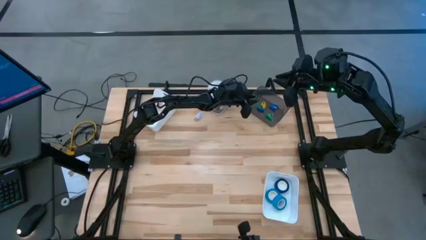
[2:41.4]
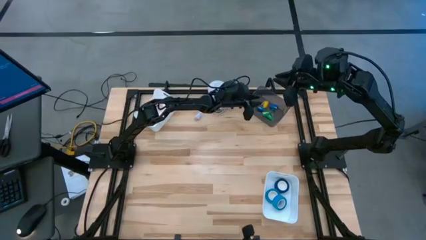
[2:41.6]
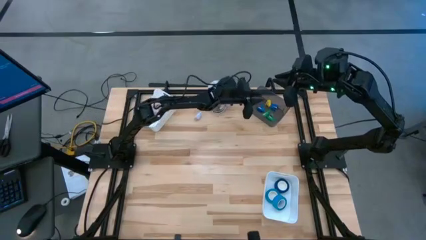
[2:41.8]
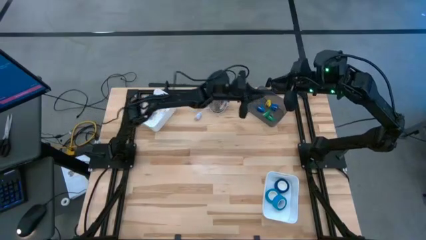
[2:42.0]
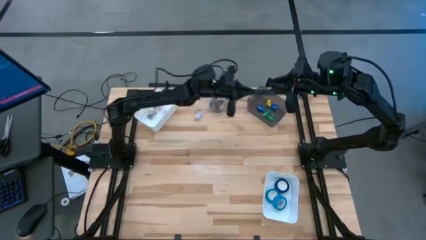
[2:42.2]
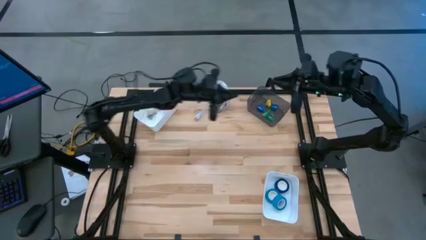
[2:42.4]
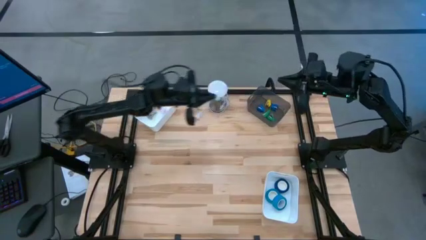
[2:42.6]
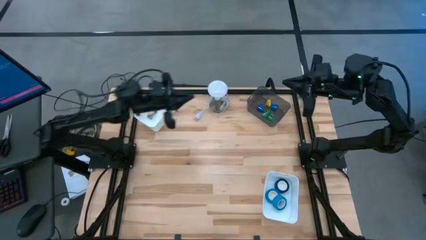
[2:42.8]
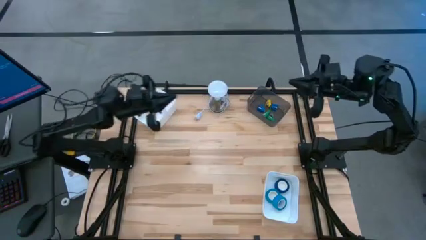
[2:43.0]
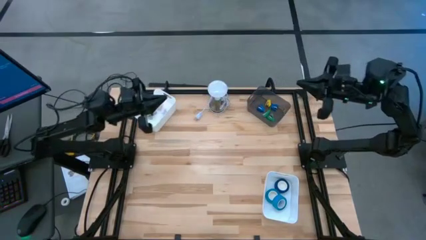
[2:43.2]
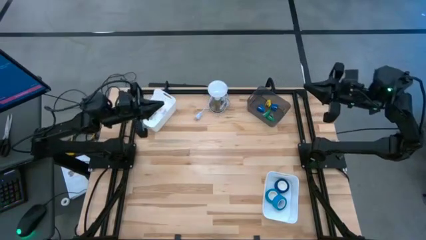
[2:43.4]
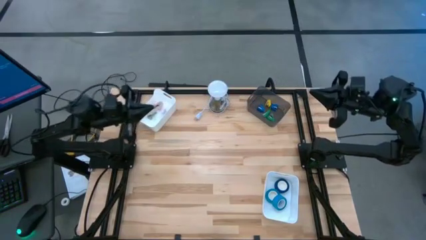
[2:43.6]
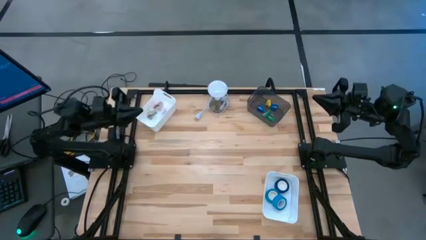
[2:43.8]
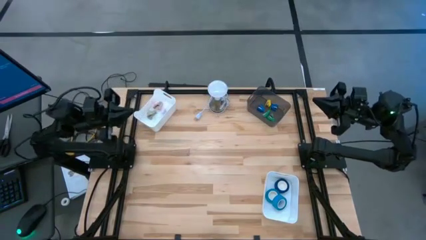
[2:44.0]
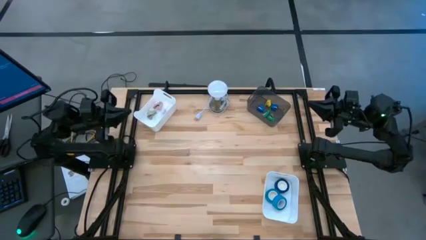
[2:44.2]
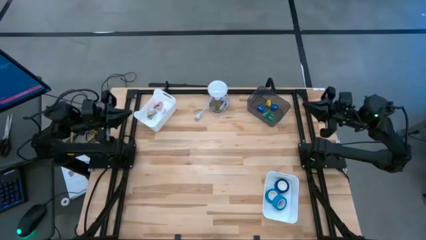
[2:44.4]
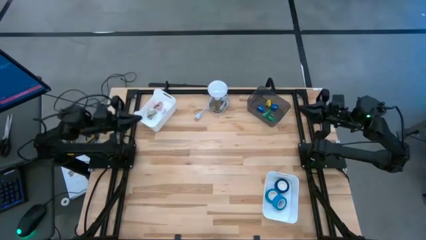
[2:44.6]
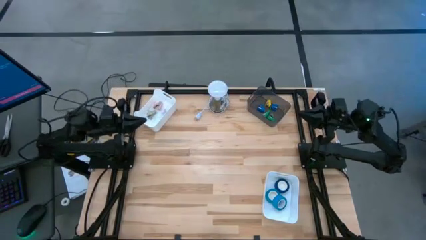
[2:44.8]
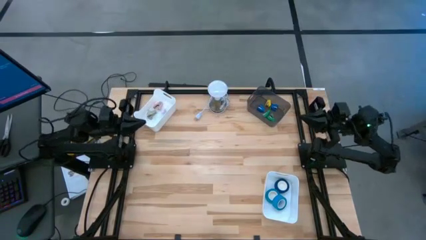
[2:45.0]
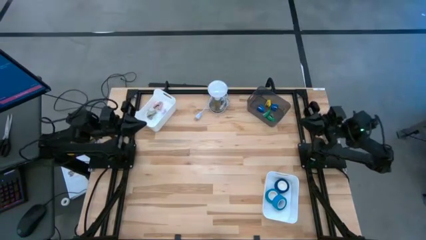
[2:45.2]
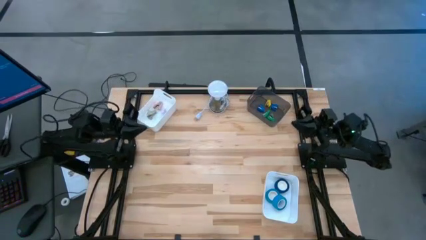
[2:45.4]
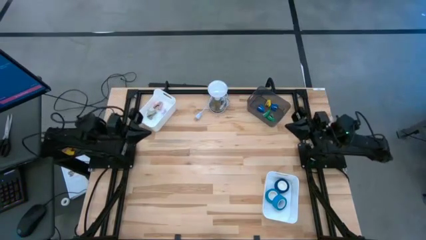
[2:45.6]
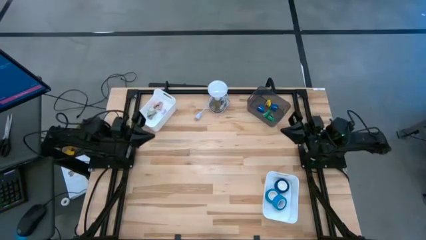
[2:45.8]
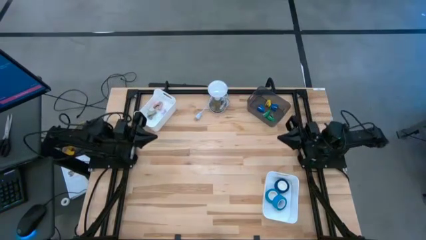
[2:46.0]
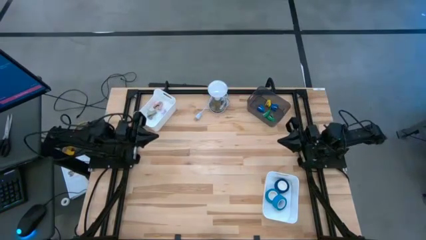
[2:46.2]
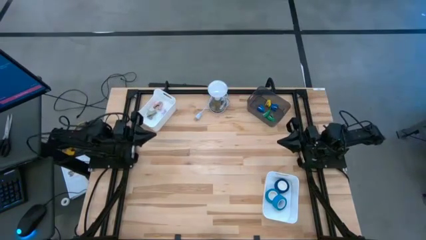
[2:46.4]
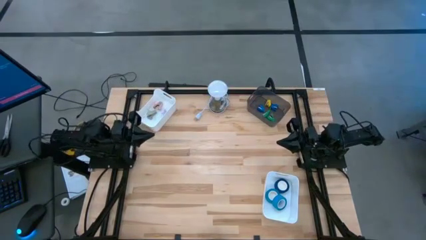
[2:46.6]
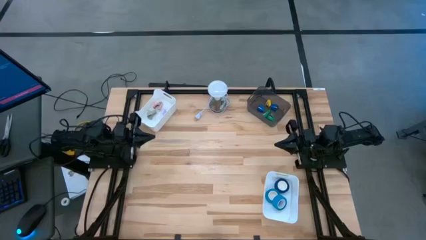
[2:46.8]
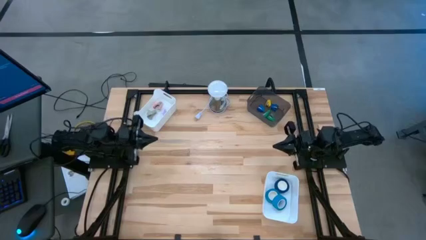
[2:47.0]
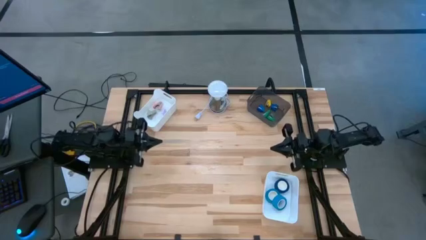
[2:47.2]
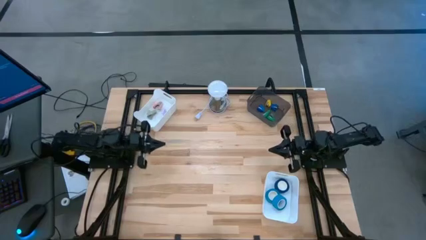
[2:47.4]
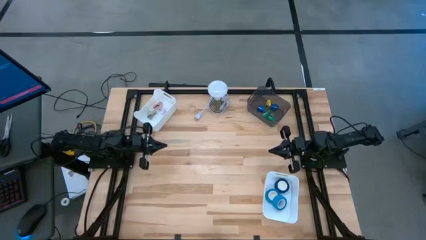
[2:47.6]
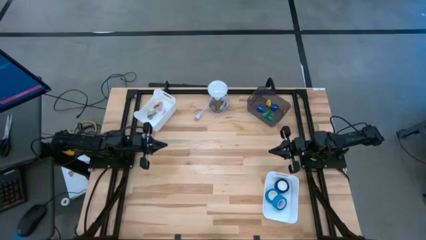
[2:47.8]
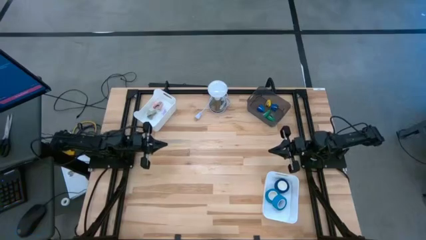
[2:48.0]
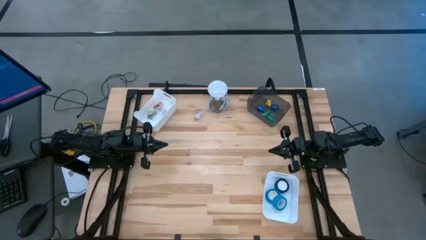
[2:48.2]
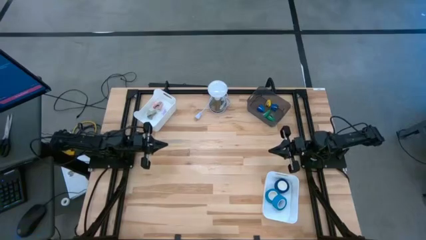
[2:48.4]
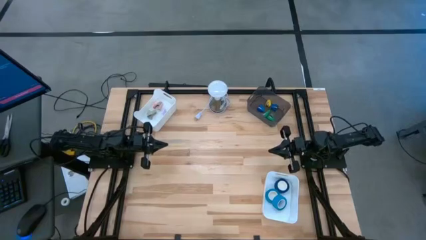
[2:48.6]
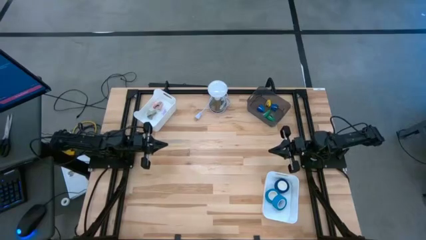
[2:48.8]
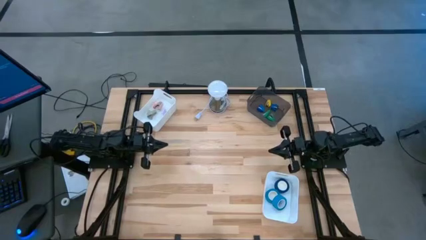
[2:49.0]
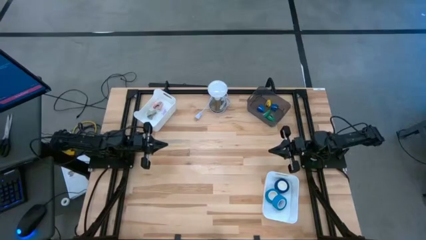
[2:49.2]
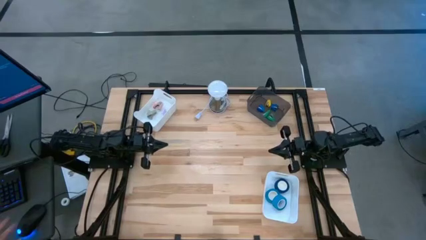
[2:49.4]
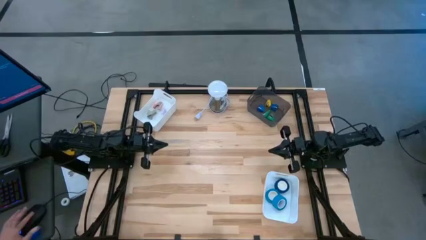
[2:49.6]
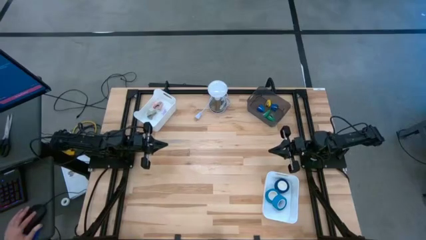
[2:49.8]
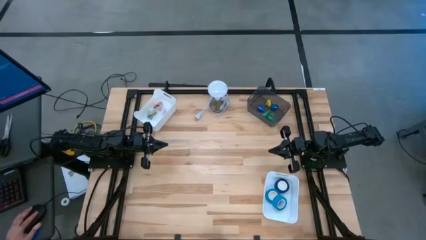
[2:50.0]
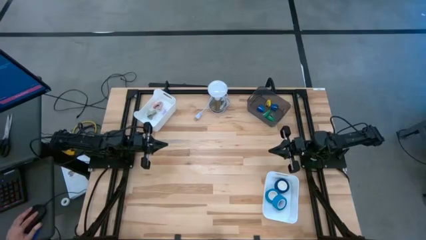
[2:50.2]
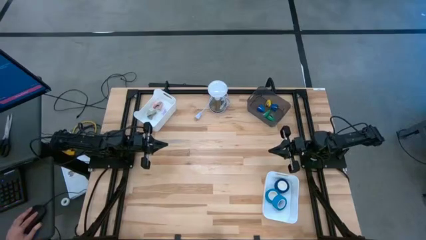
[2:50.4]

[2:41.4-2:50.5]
Task: Pick and place Stapler, Stapler remover, tape
Return to Home Position

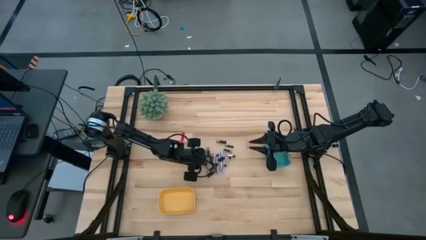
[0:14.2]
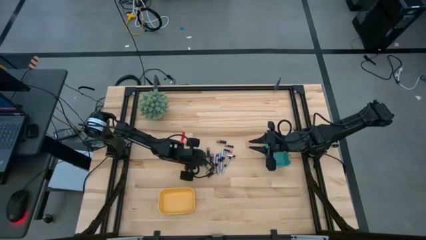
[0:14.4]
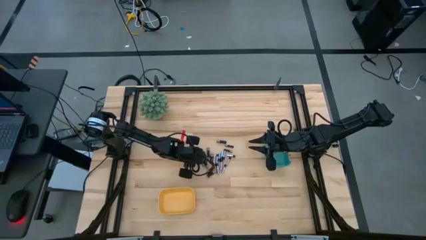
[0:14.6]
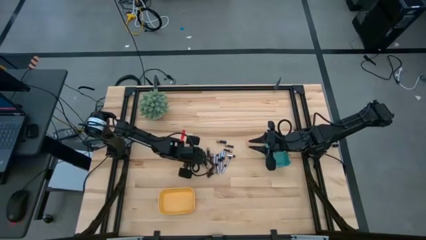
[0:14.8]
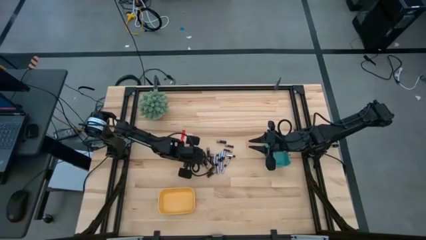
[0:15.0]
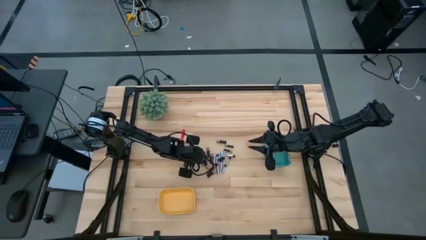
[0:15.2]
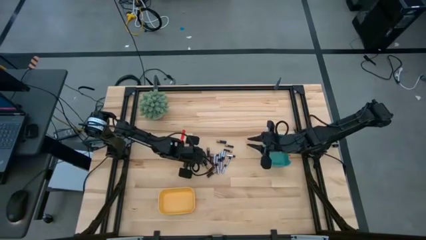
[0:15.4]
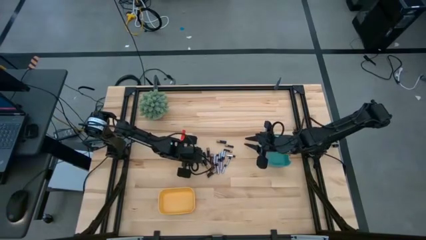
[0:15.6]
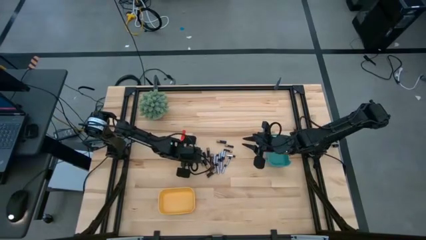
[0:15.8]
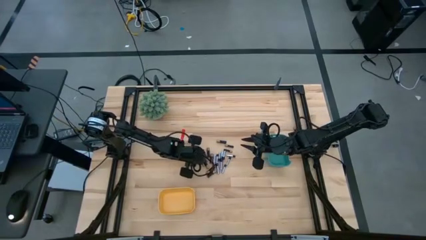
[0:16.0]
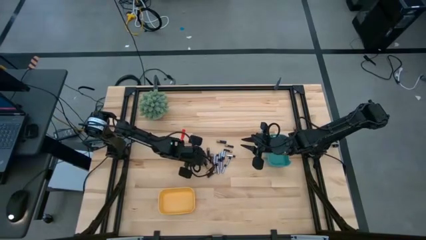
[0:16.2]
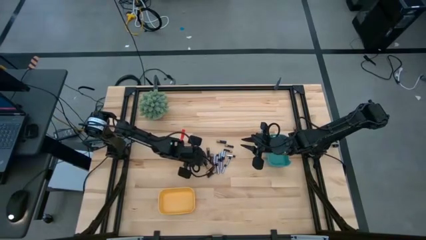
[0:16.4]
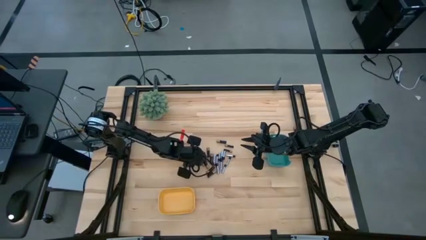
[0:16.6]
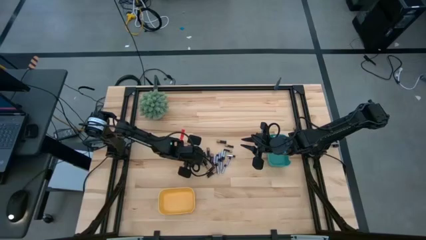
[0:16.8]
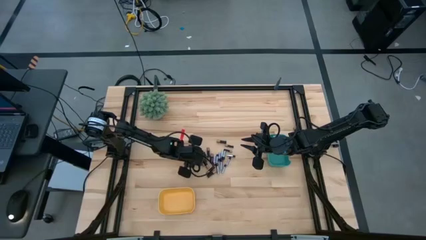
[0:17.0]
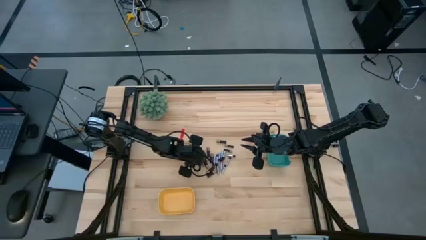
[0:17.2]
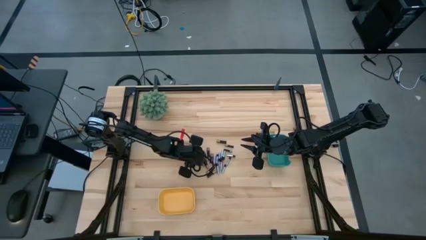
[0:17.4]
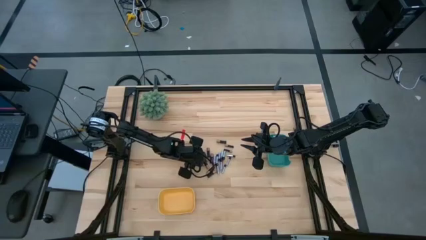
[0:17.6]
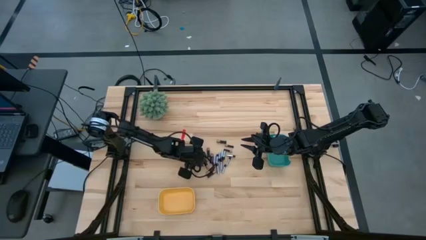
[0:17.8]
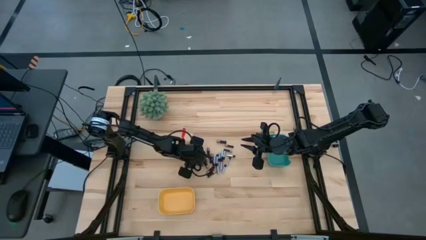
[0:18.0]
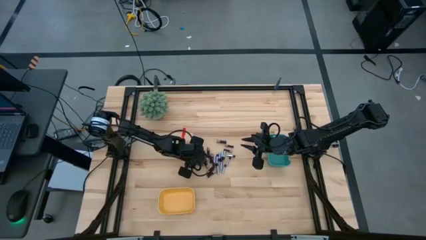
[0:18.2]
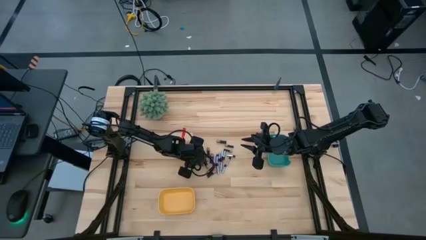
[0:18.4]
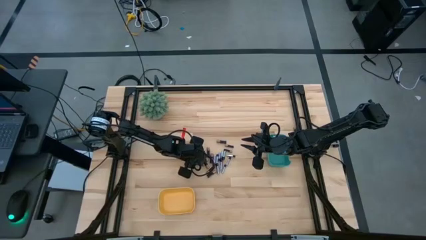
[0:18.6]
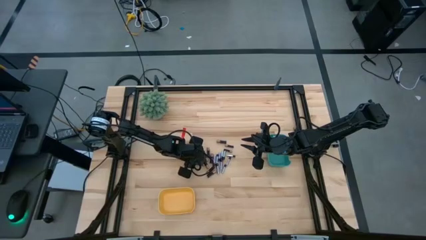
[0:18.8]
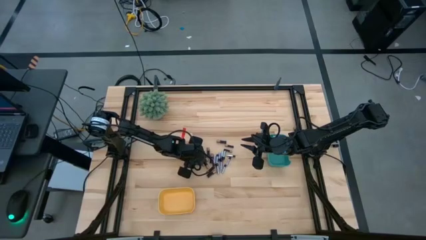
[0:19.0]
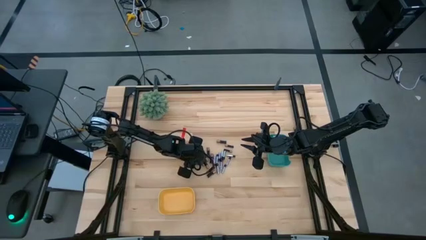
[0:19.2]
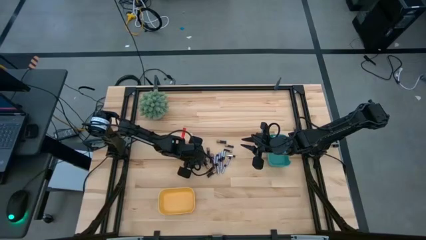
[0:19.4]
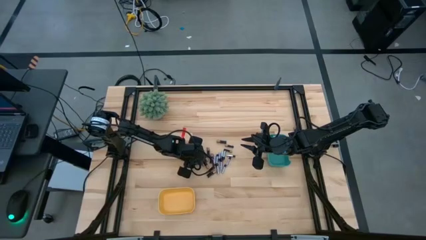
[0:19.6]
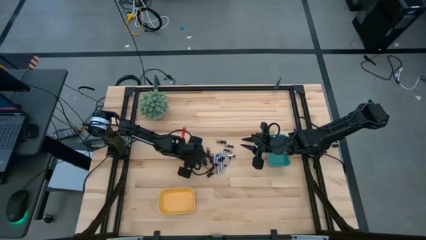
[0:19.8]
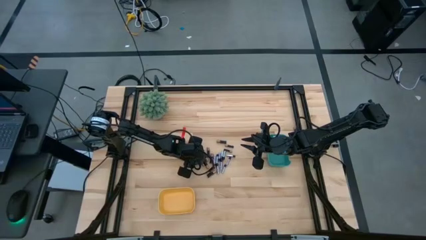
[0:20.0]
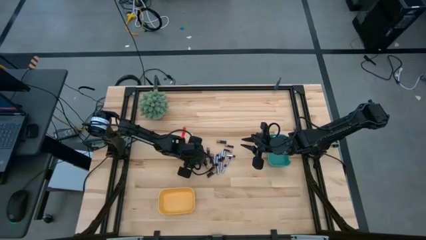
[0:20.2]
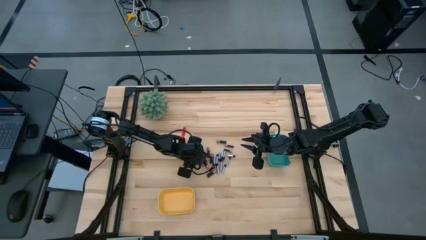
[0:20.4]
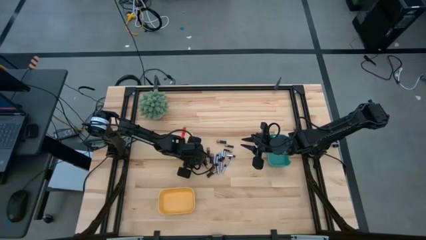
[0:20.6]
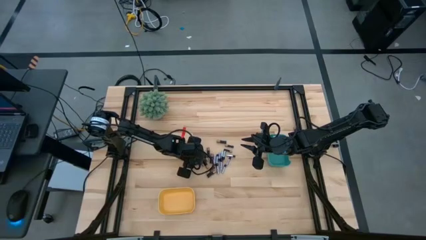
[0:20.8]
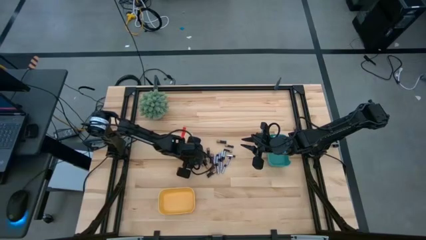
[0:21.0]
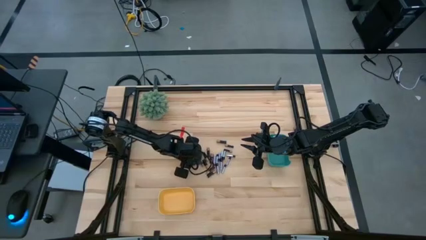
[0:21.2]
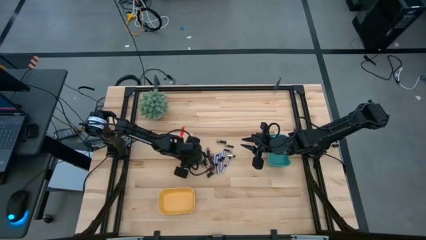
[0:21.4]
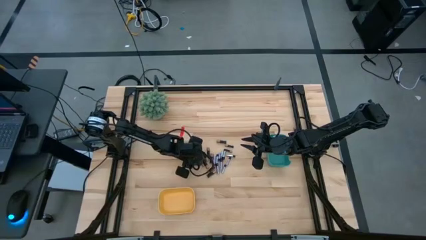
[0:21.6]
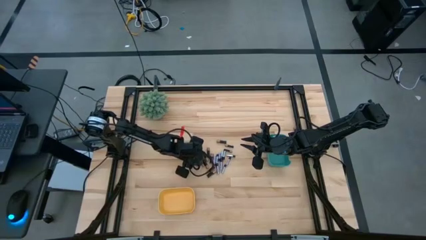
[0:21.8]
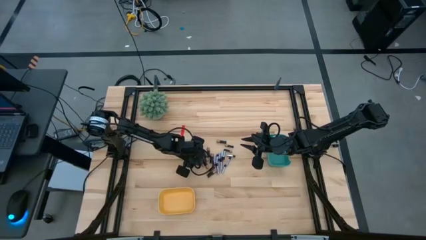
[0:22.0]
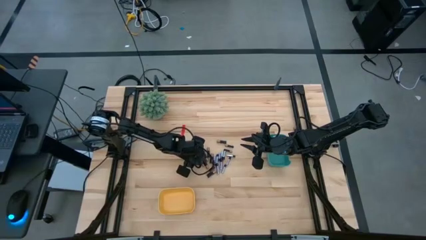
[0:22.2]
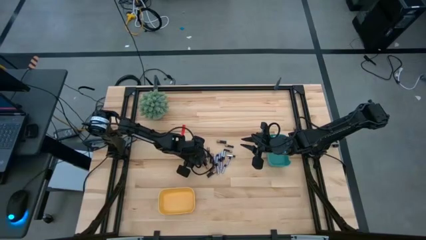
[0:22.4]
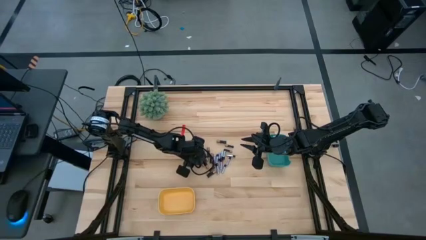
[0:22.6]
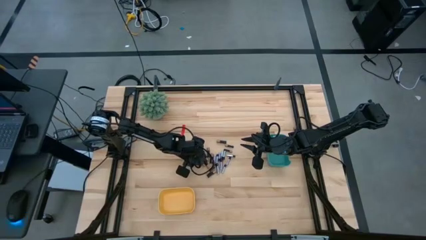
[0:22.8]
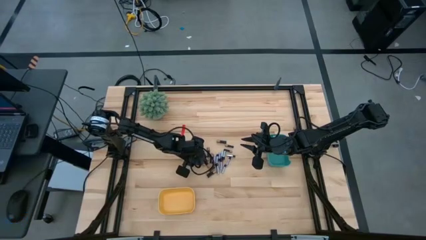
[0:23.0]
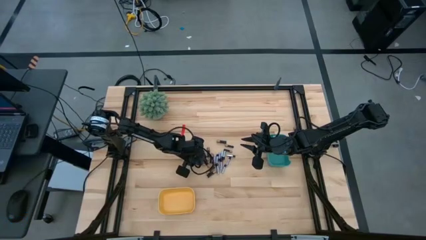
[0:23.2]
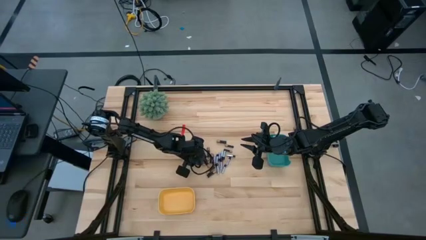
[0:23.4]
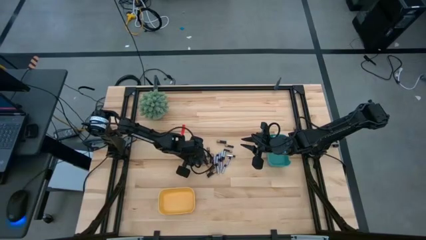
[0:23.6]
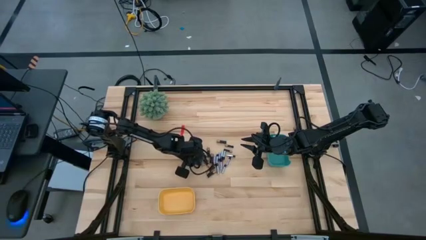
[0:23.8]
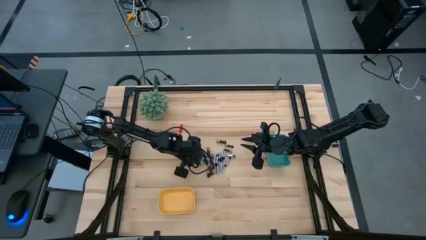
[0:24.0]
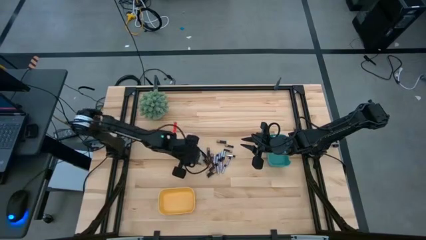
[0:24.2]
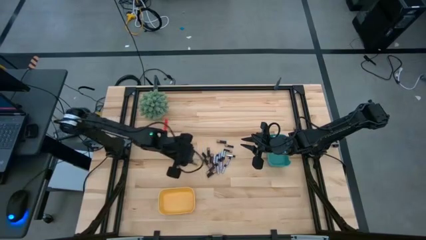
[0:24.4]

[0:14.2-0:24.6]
Task: Sort batteries
Put the black battery into the yellow bin
